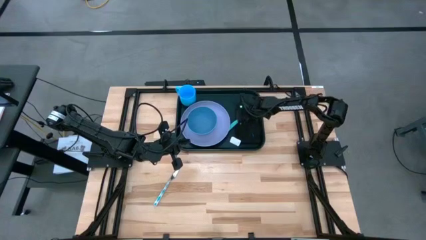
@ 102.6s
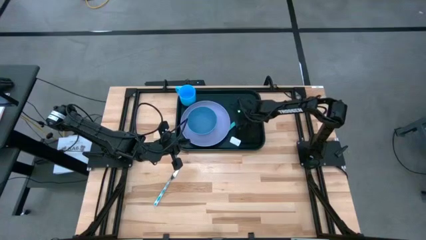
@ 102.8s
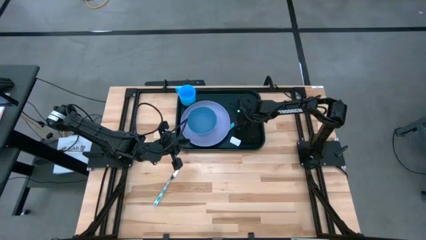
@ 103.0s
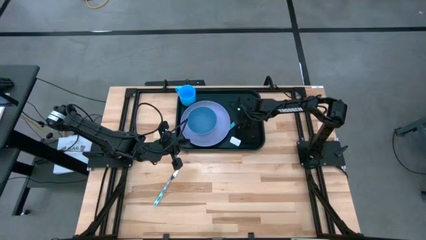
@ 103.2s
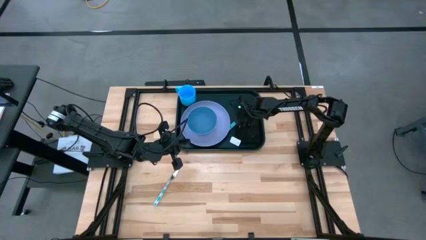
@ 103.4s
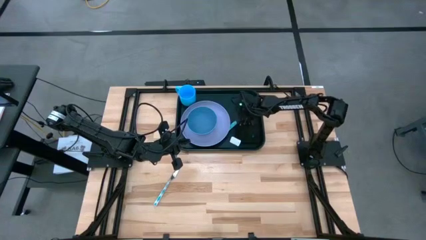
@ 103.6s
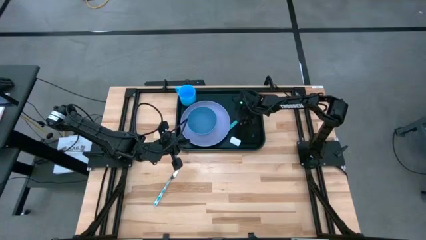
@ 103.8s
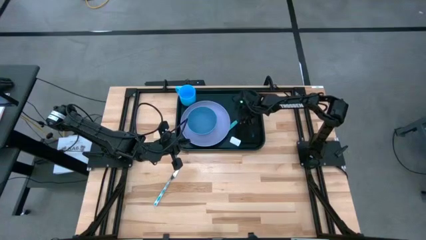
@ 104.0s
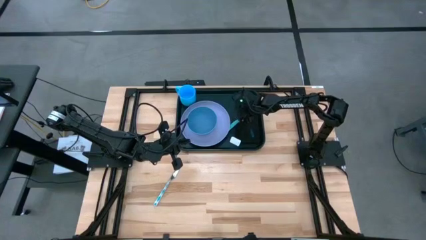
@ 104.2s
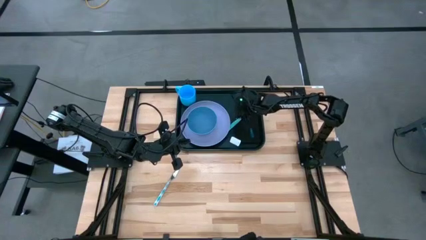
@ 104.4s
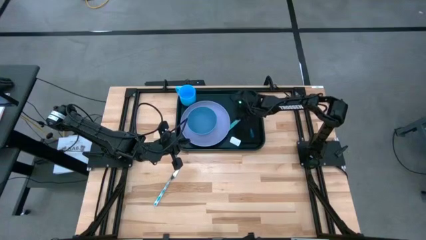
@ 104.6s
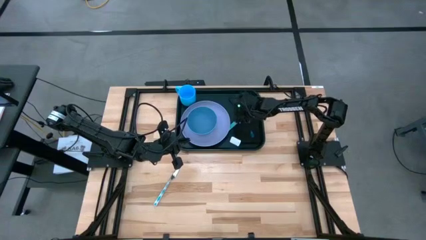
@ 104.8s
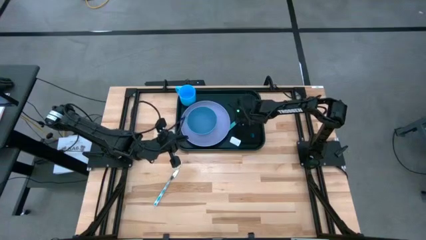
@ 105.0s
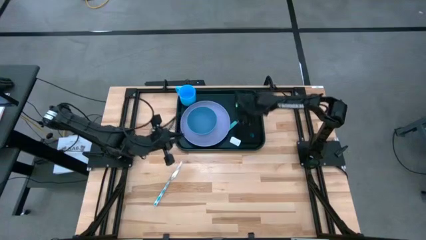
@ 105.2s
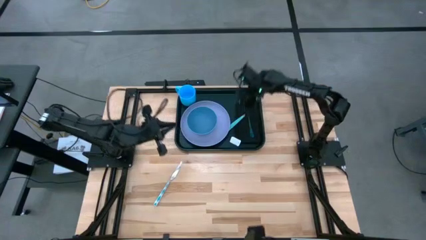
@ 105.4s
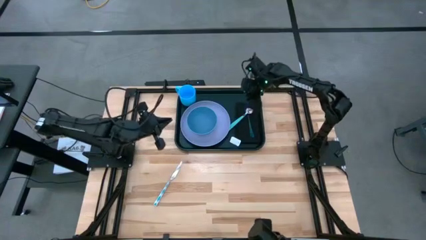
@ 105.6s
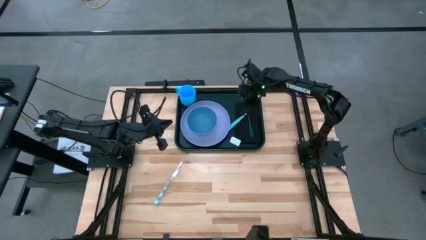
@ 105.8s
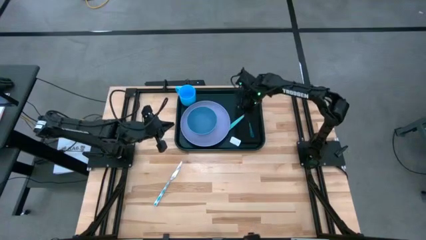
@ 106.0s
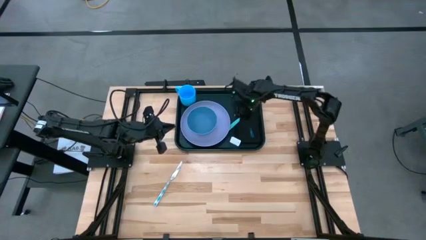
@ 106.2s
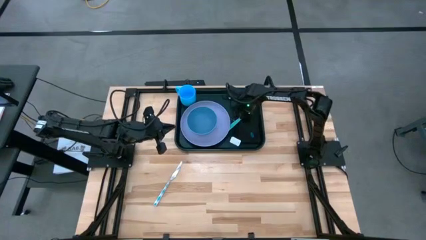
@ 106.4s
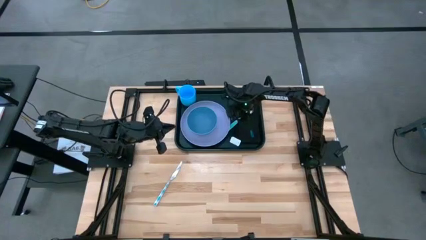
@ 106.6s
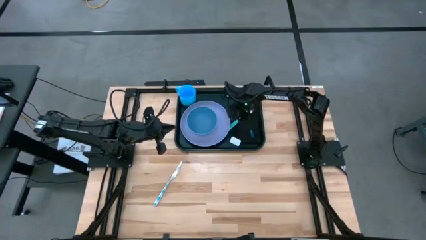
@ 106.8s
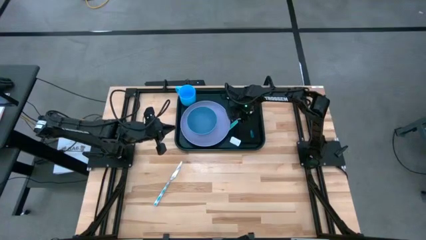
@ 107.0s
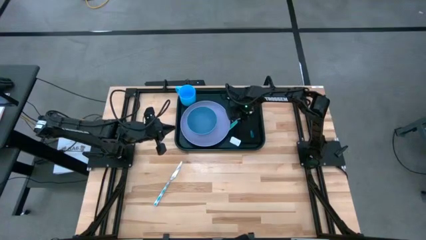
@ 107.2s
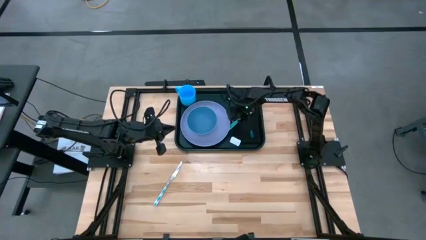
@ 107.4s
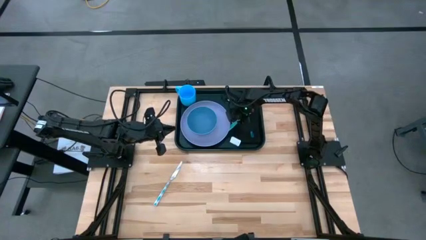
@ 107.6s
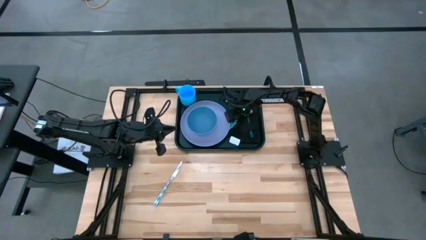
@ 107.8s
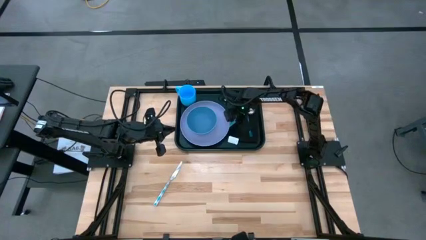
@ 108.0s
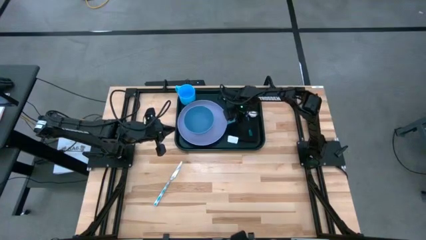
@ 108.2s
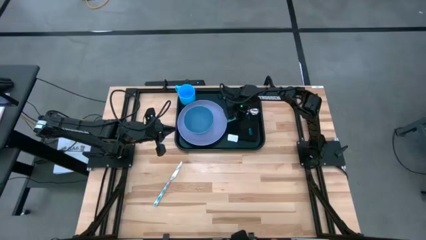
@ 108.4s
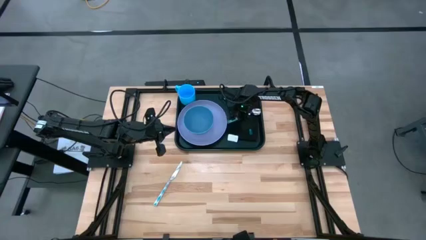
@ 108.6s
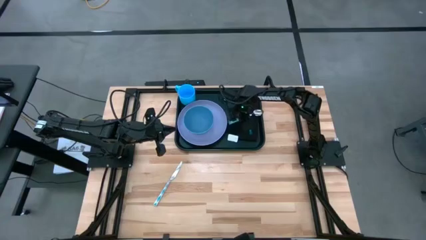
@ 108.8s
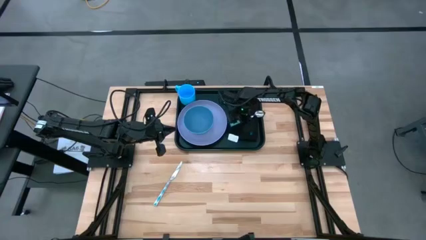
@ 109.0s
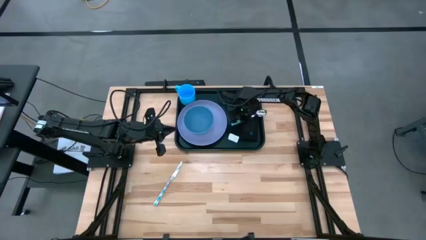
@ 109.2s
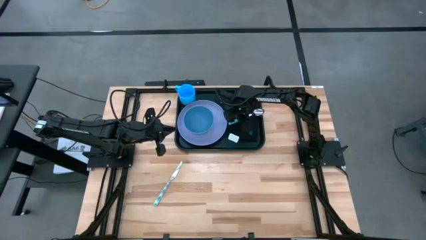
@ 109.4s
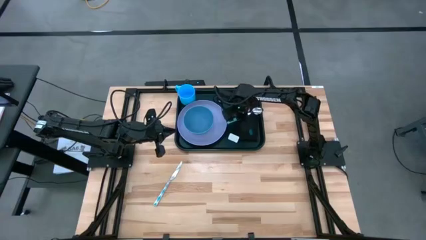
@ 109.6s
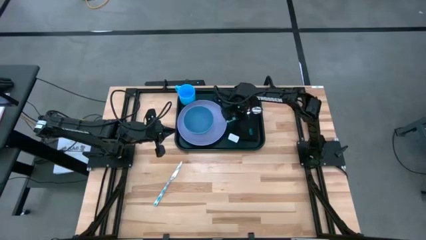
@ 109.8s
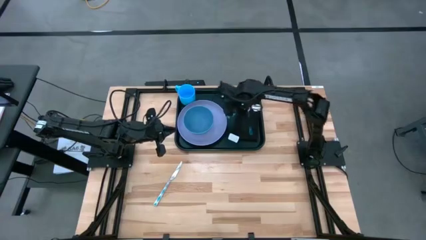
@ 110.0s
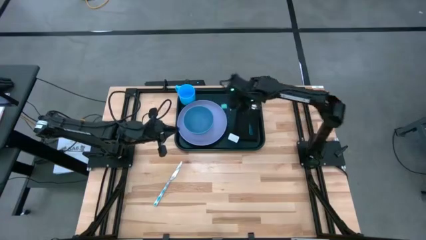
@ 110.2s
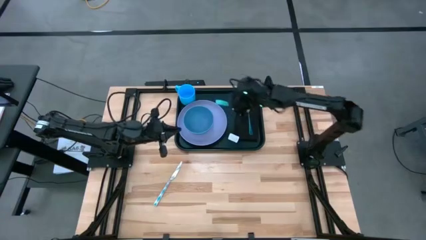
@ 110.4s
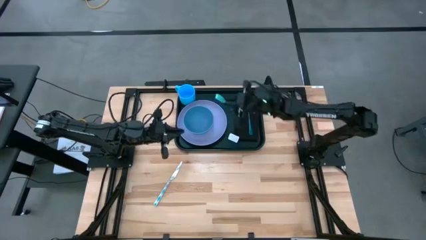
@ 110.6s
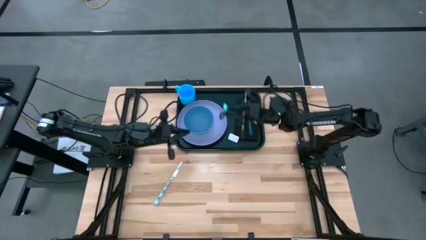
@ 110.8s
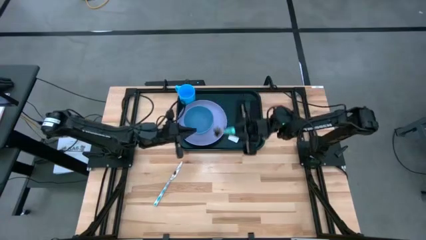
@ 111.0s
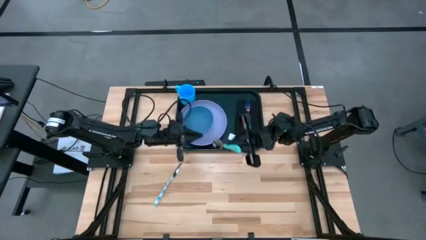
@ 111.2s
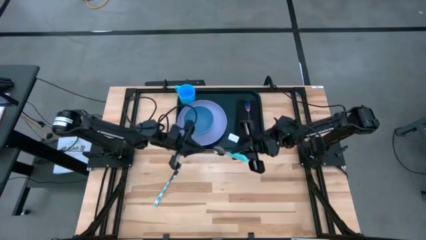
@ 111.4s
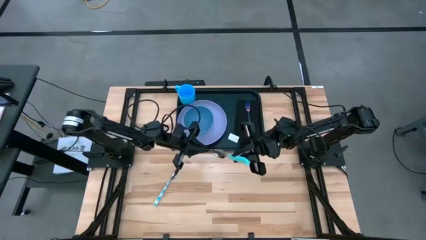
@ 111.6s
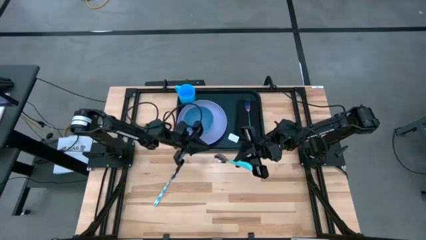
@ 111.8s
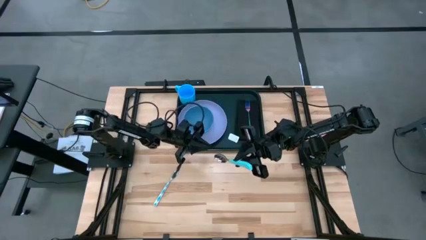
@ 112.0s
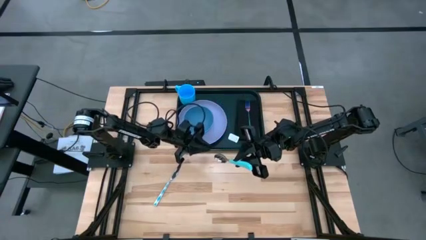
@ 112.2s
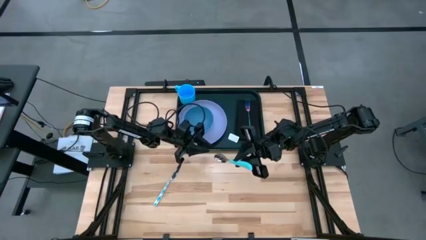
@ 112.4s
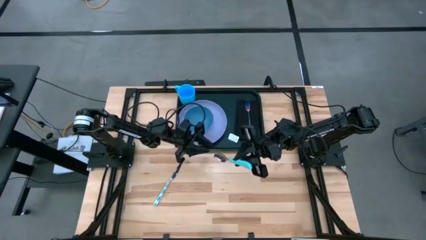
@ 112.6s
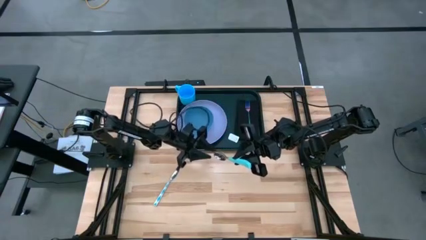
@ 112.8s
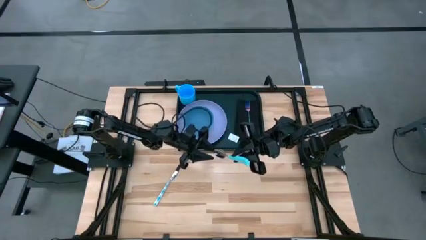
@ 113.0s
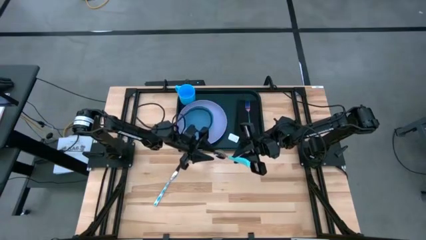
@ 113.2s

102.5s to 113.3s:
Task: Set up tray
Put the blue spoon on top of the black napkin to the left of the blue fork on the black tray

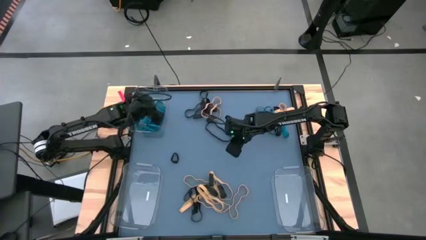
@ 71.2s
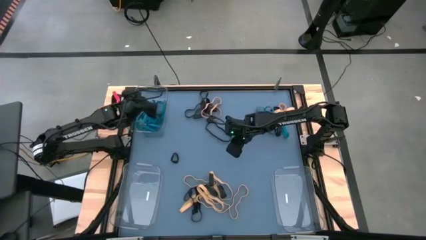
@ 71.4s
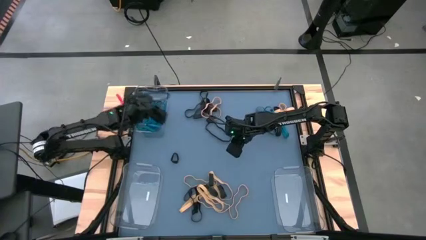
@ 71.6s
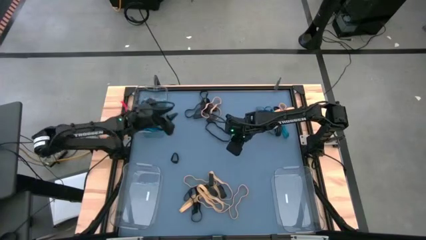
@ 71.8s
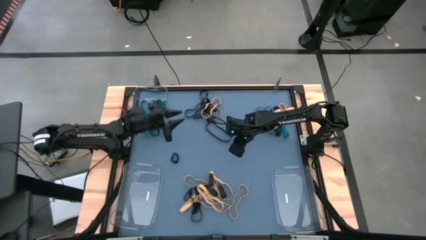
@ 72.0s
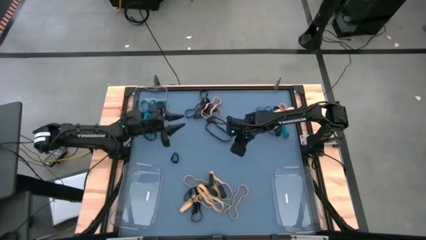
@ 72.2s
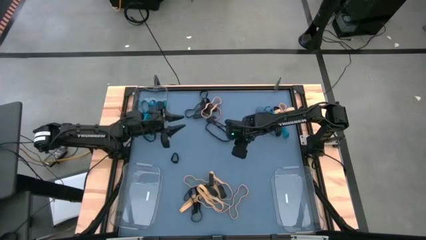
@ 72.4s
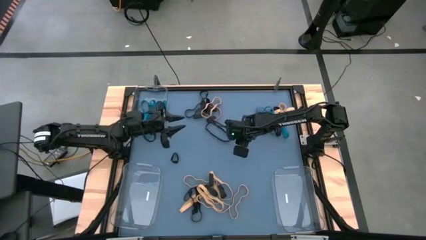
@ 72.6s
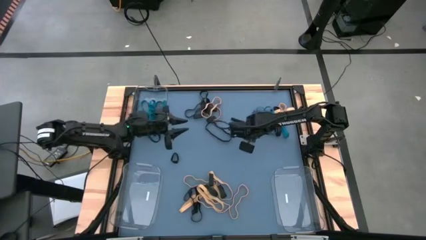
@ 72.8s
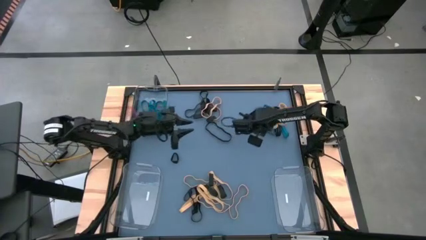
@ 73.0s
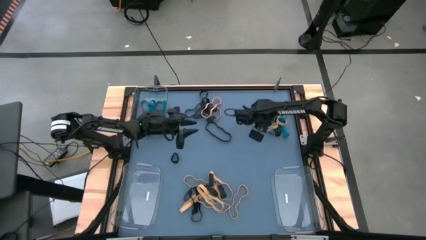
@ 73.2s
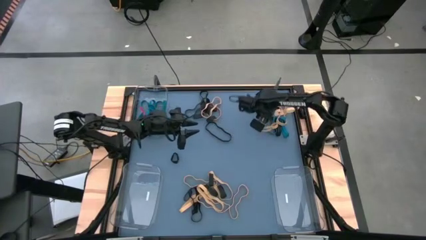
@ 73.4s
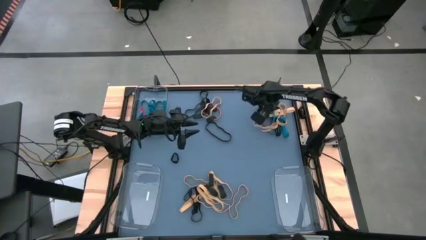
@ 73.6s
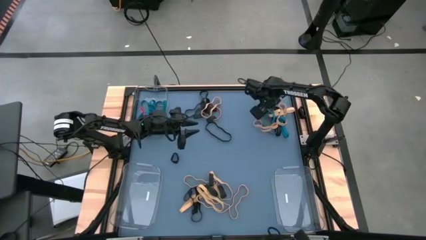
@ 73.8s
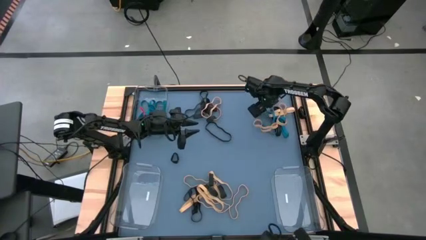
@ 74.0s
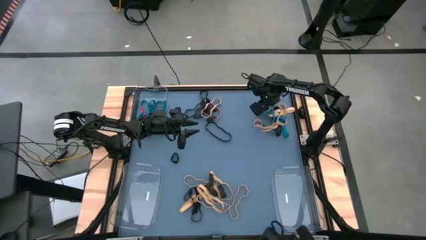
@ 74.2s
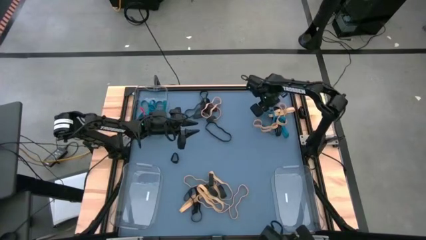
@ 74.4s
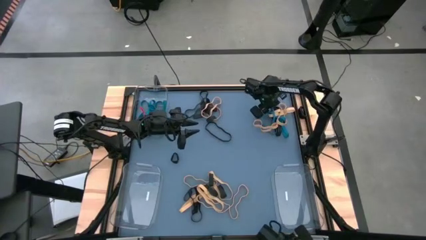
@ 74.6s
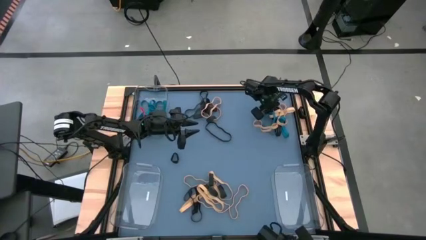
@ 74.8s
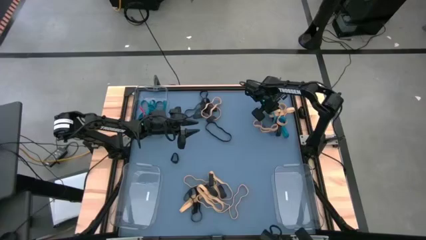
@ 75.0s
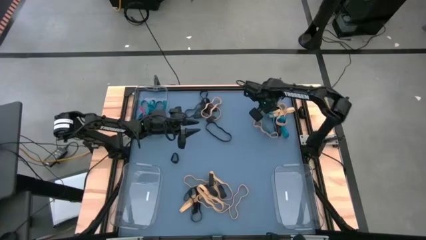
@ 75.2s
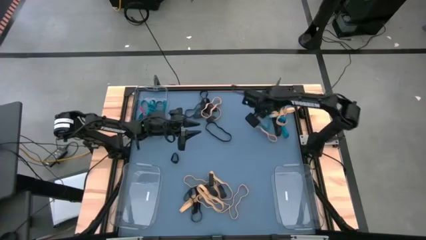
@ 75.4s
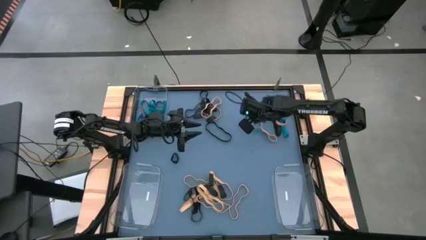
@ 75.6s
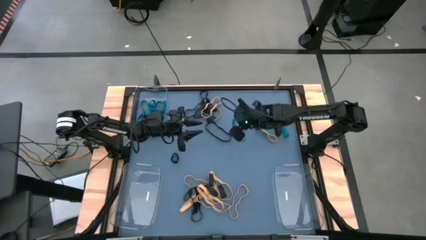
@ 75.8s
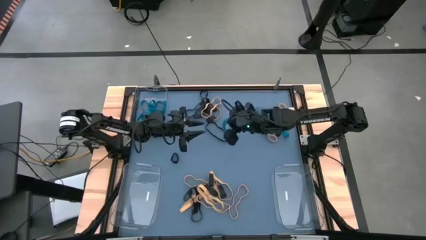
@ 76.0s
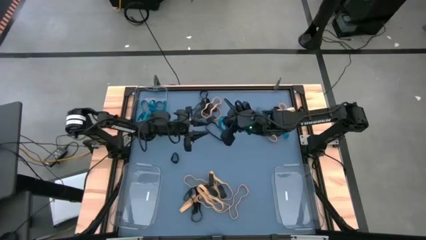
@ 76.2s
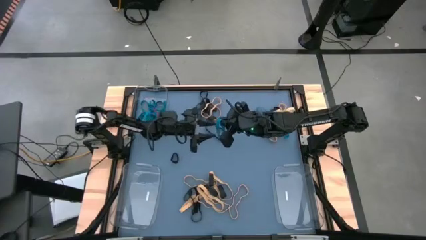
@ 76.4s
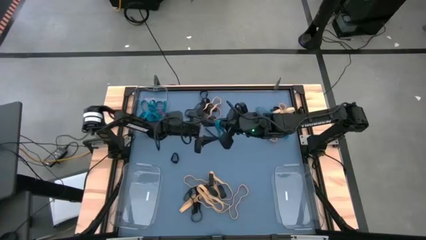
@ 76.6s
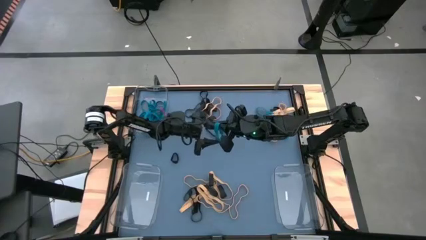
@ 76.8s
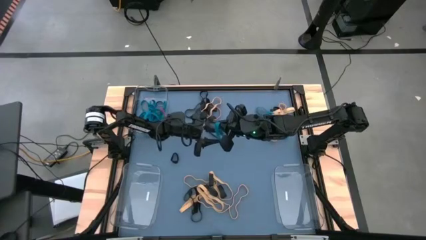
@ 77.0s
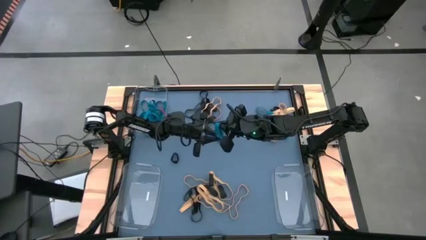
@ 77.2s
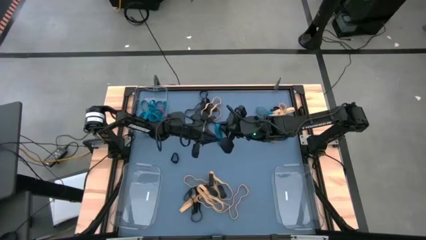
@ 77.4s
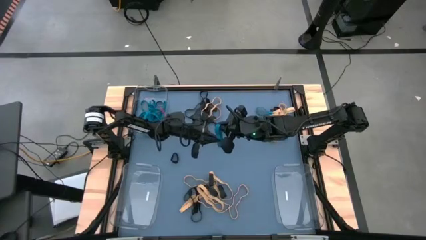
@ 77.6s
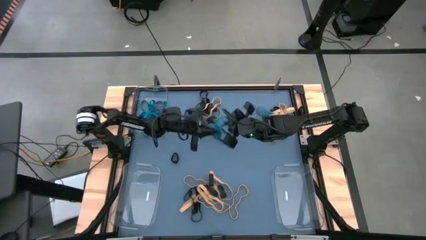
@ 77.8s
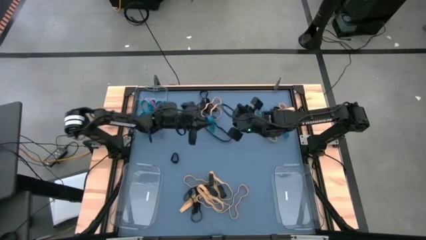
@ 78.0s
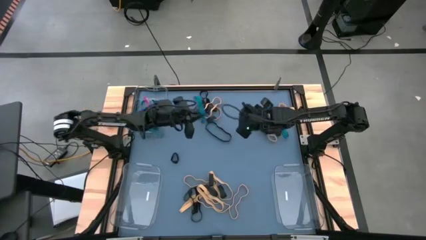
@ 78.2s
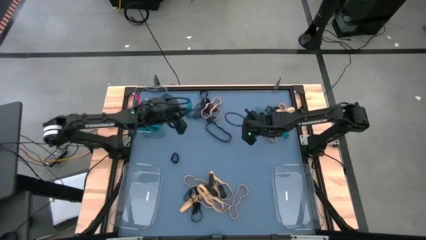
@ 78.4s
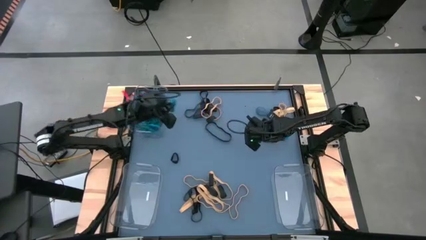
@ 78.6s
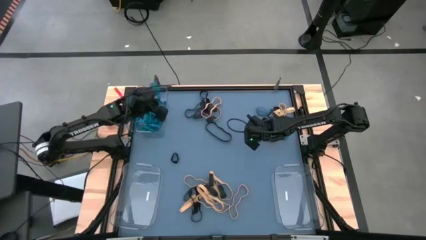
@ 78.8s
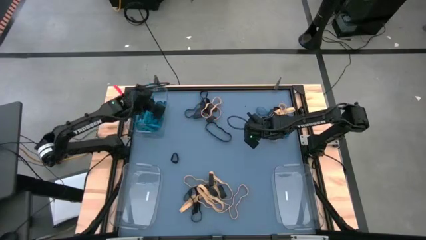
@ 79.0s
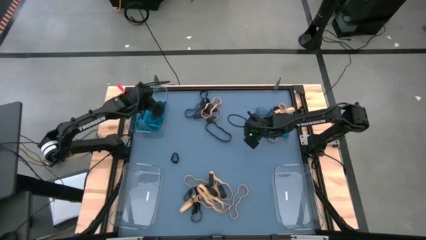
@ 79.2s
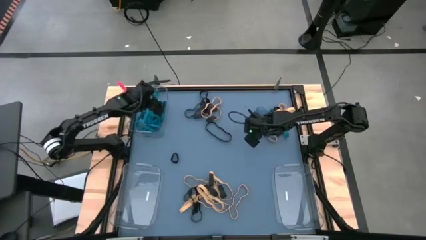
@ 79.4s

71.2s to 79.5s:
Task: Sort rubber bands into baskets
Put the blue rubber band into the top transparent bin
